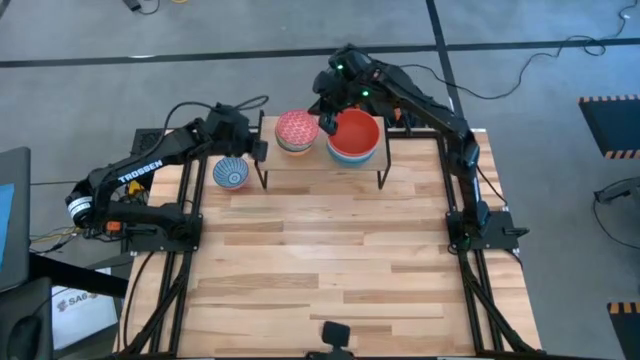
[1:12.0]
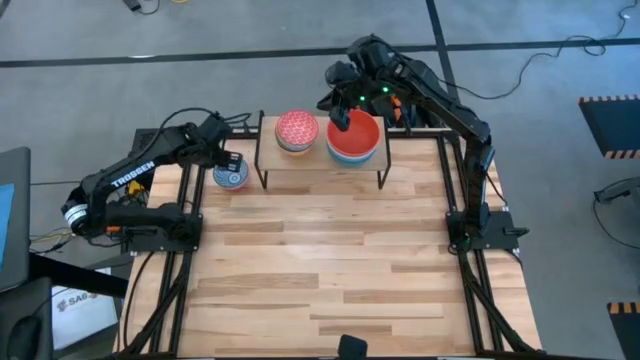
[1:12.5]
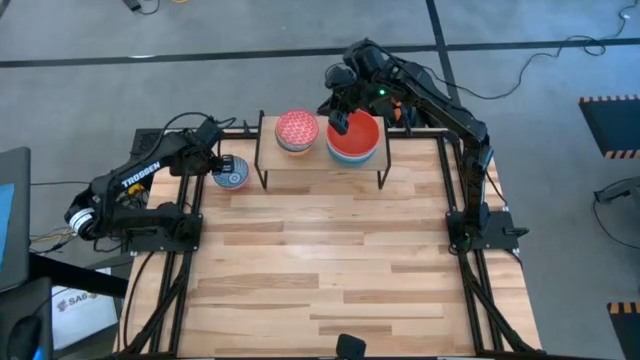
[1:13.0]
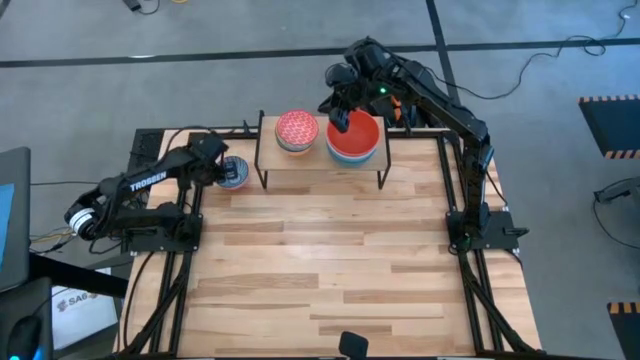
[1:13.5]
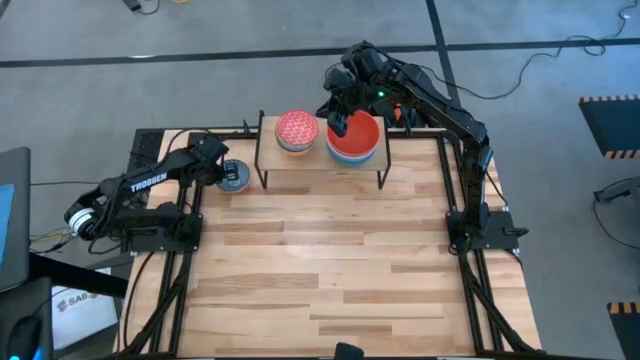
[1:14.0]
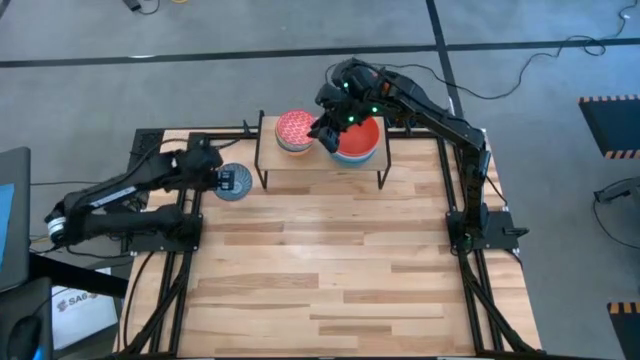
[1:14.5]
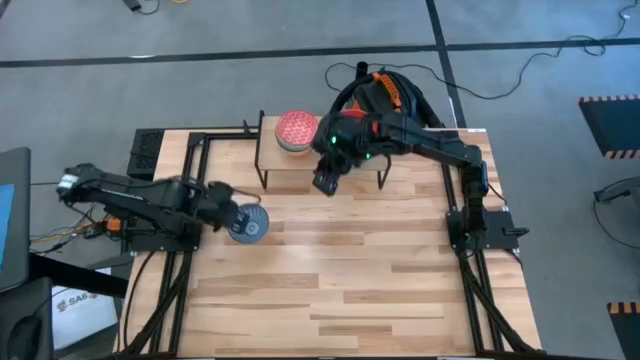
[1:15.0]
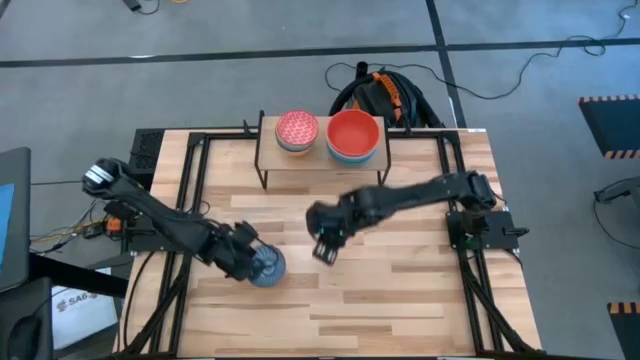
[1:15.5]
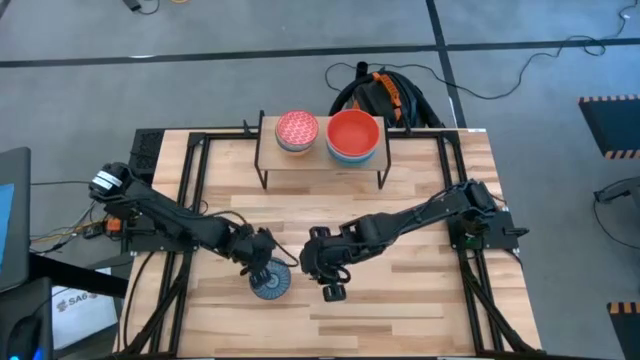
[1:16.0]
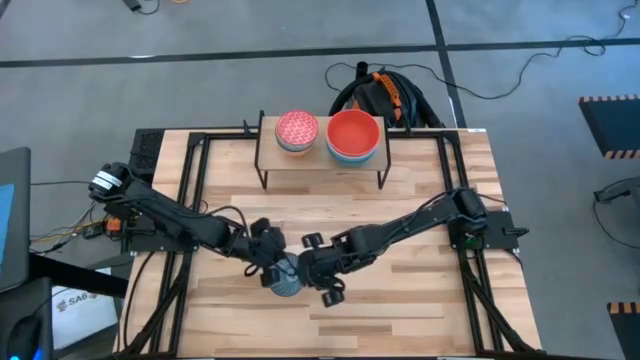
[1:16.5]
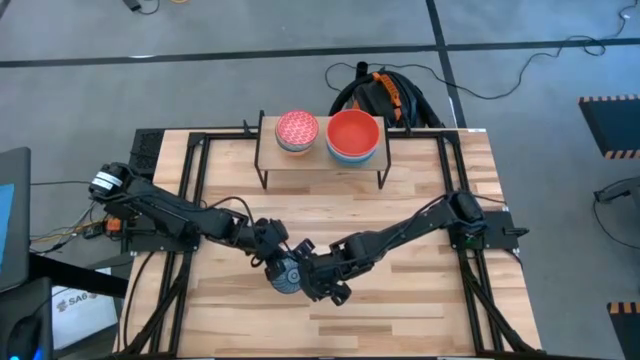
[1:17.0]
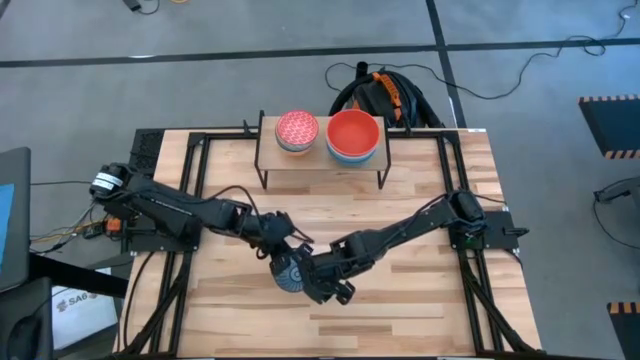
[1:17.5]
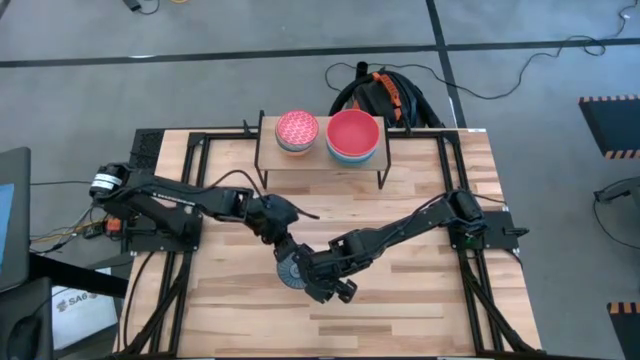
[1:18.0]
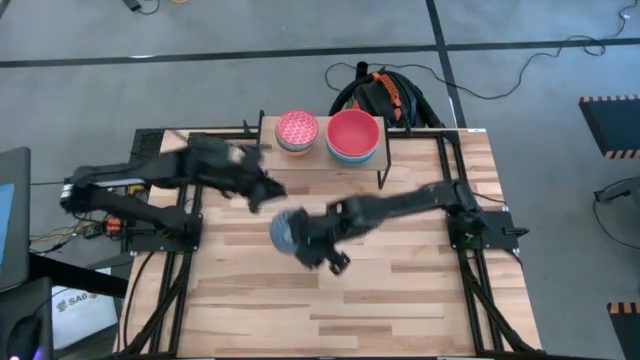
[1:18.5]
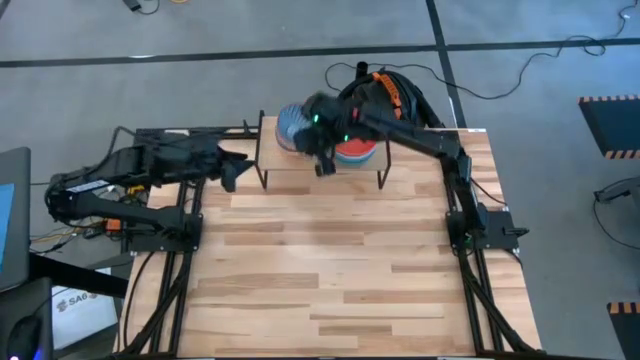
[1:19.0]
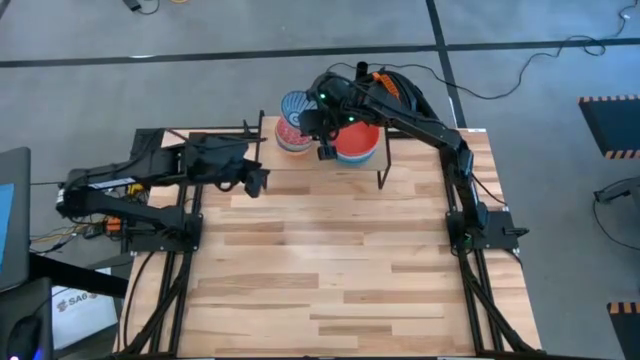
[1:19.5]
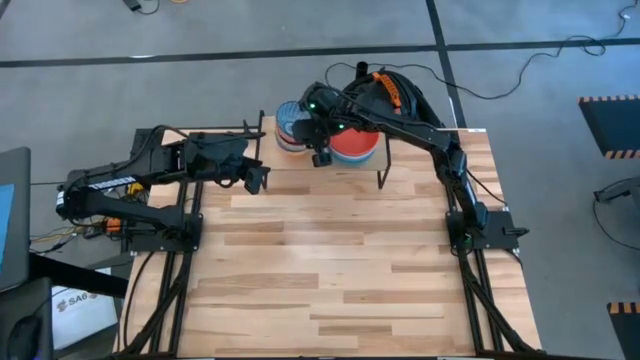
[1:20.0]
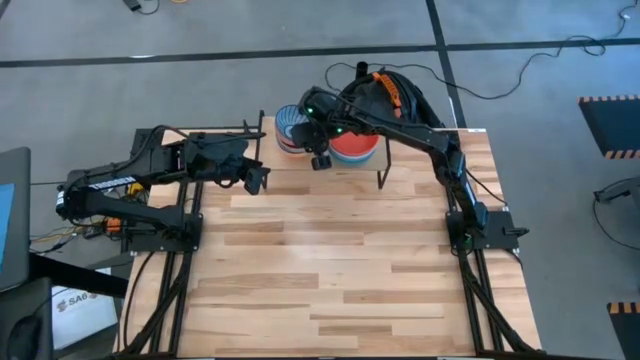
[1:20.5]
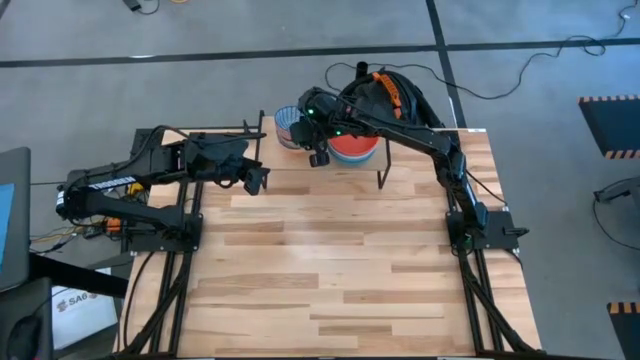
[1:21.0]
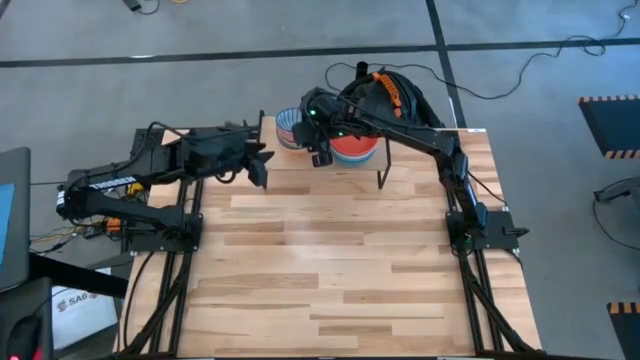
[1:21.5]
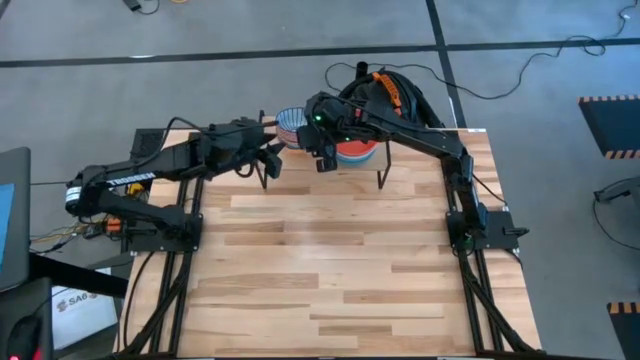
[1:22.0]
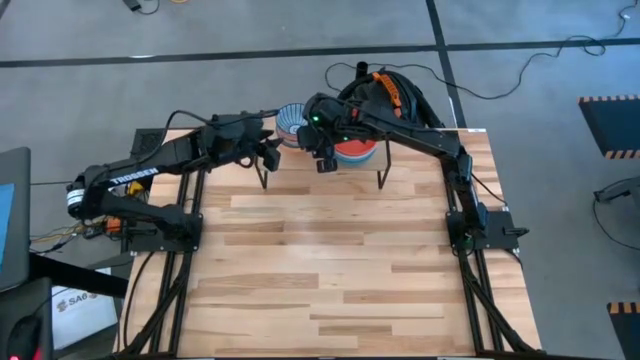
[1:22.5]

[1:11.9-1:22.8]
Task: Place and stack bowls onto a shelf
Stack the dark blue patterned bowl on top of the red patterned bowl on the shelf

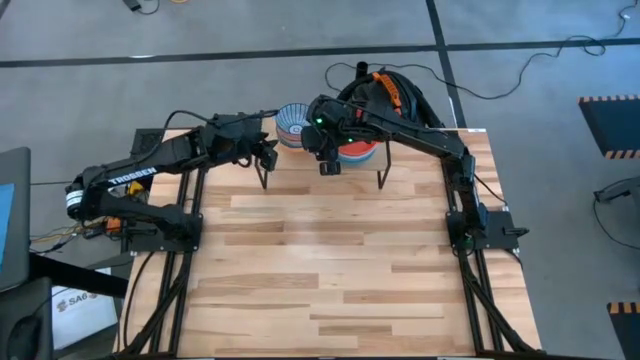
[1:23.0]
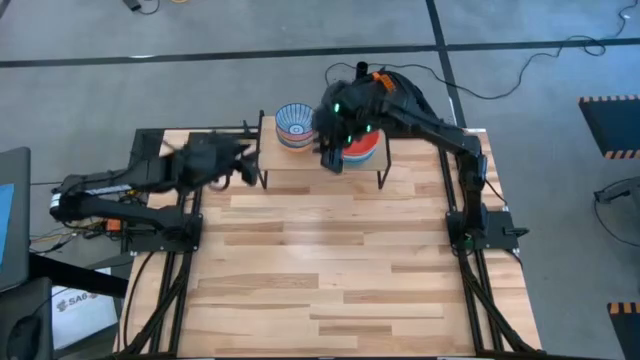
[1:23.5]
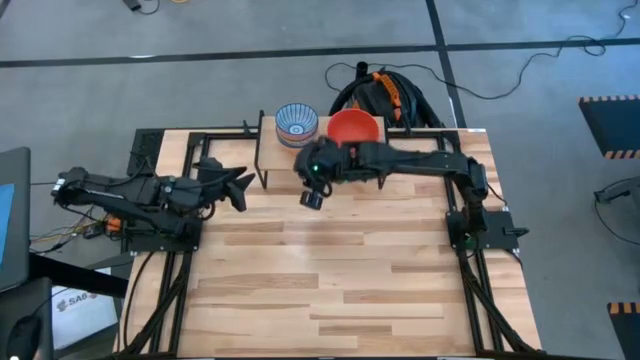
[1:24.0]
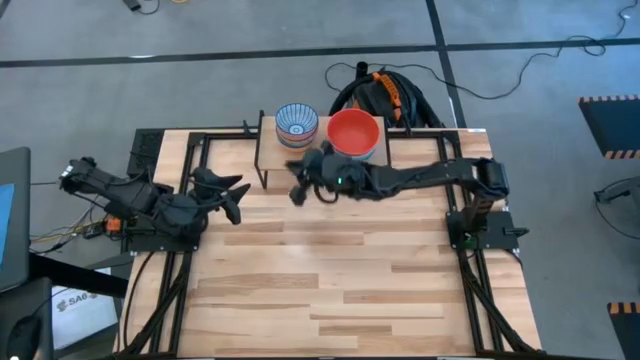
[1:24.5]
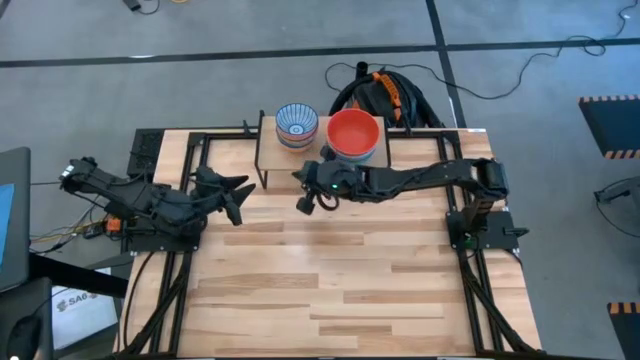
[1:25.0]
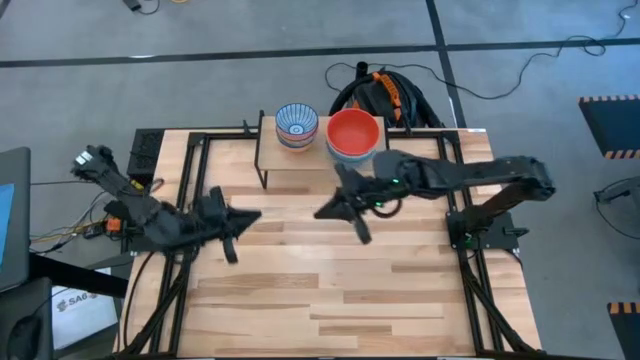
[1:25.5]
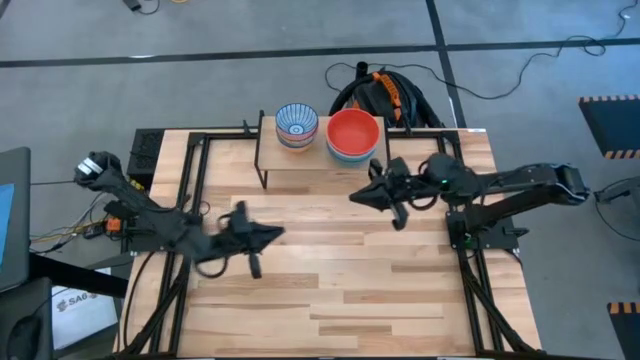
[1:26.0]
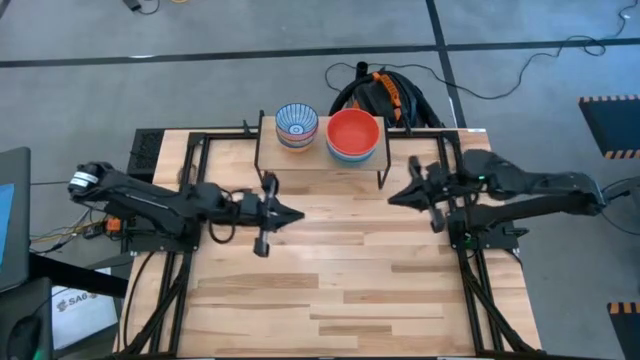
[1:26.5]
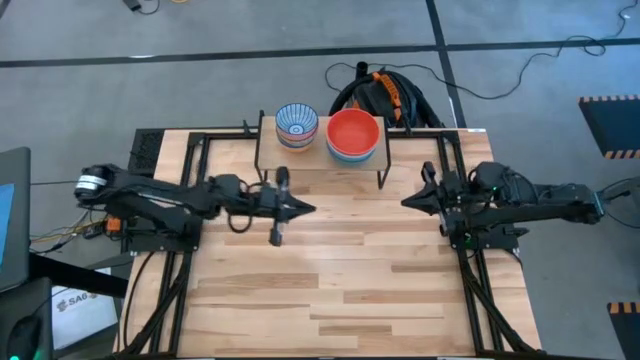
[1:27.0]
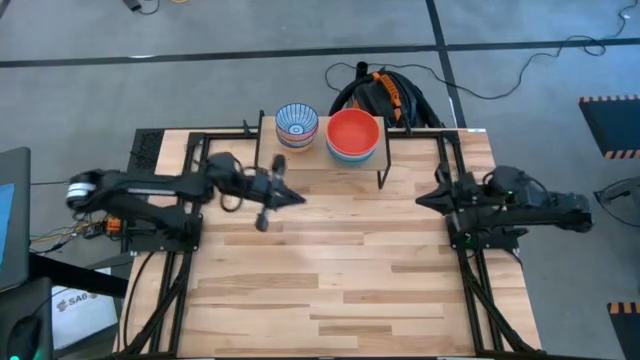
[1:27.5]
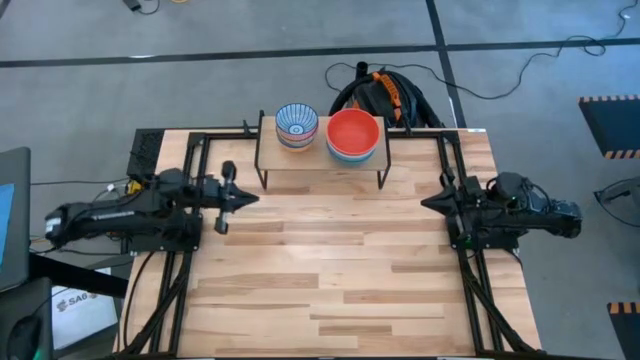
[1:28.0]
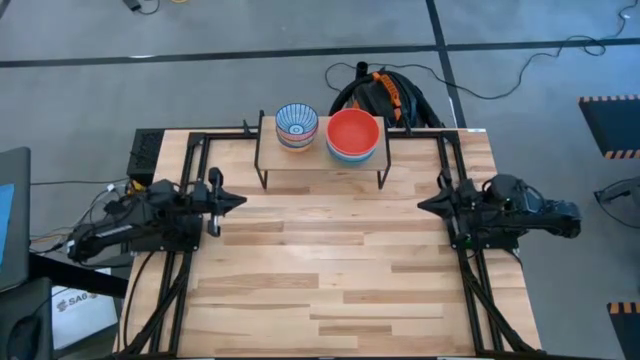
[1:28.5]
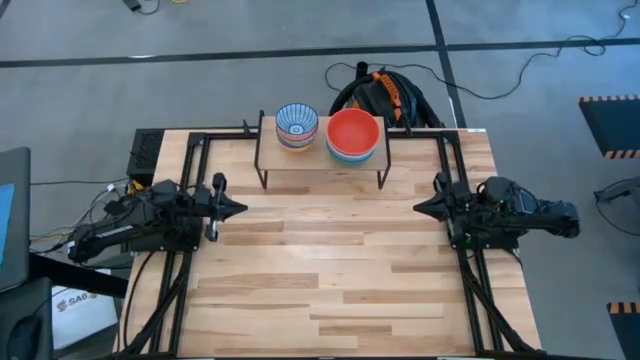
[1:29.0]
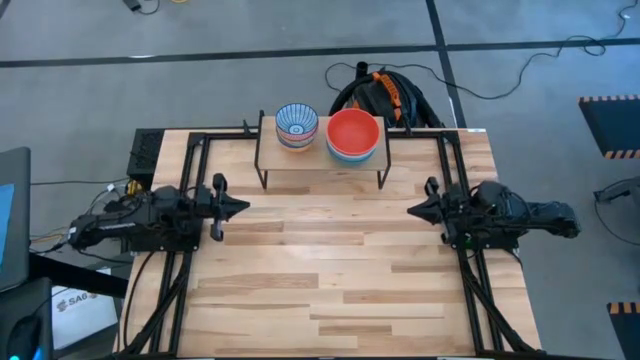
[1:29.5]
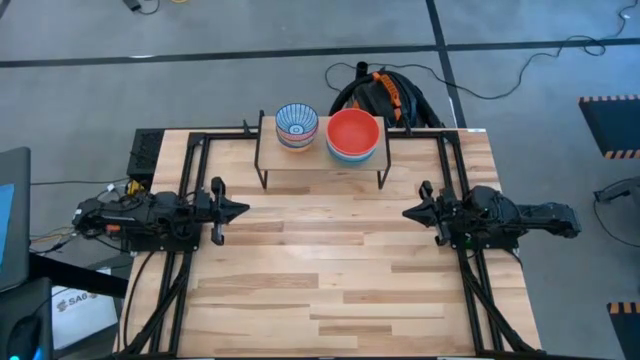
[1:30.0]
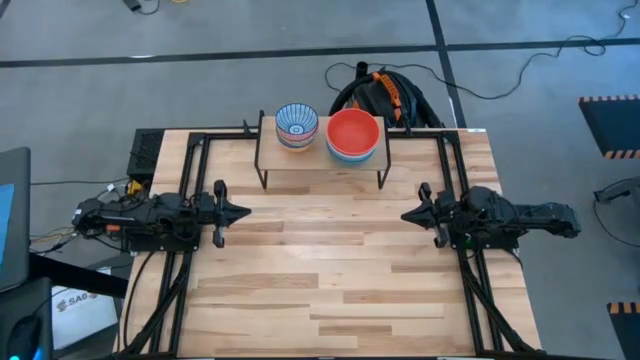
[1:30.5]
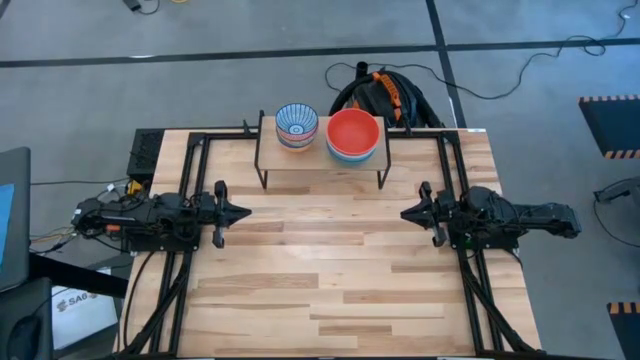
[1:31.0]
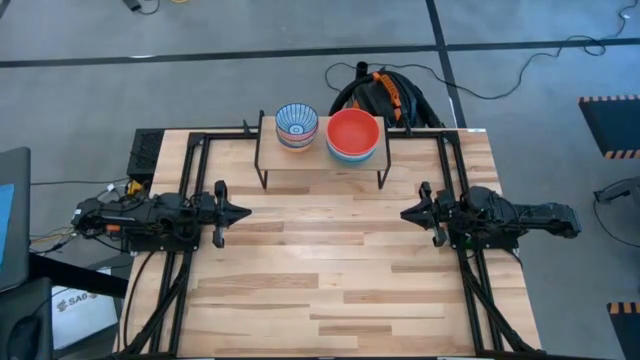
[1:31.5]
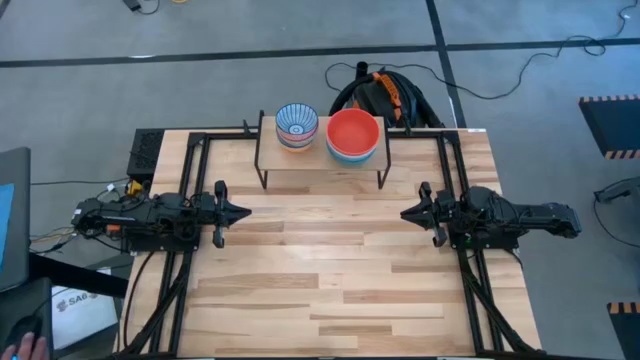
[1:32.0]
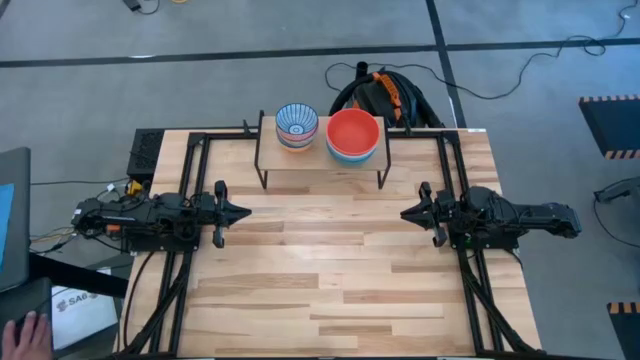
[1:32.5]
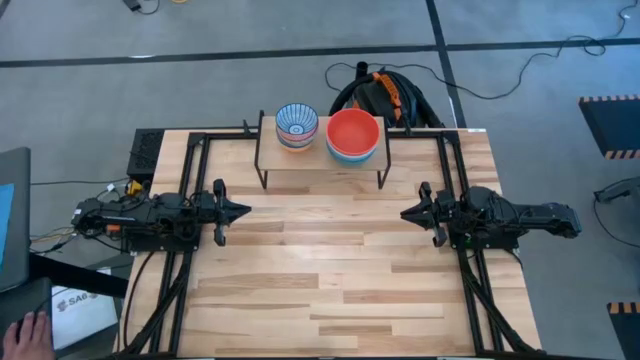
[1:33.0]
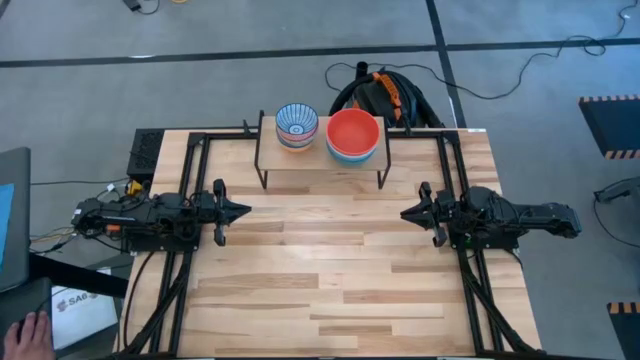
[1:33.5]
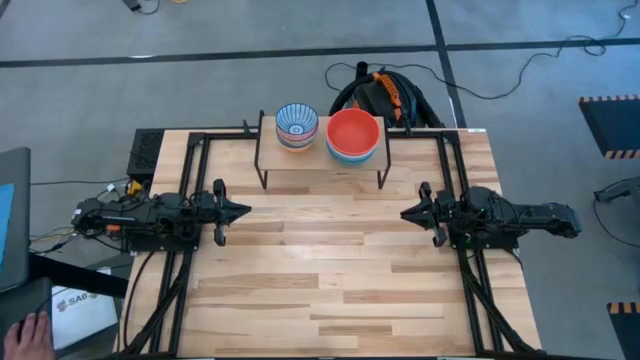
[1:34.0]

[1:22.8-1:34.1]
Return to Home Position
